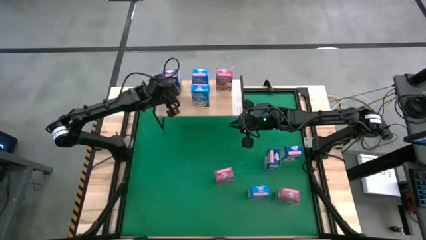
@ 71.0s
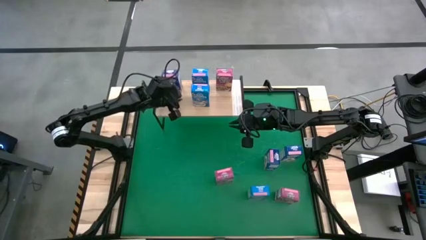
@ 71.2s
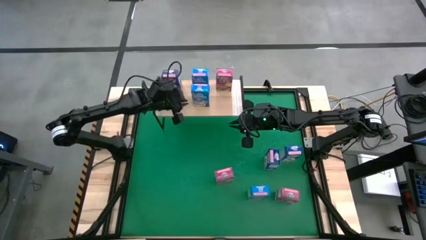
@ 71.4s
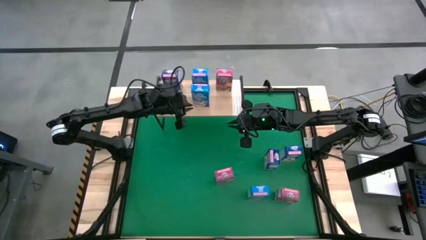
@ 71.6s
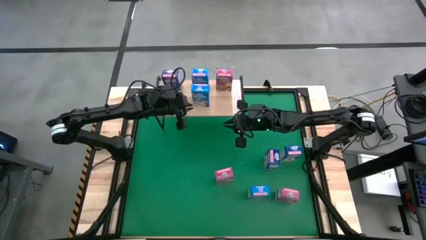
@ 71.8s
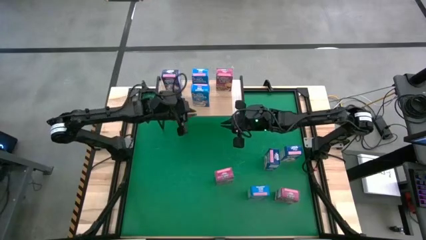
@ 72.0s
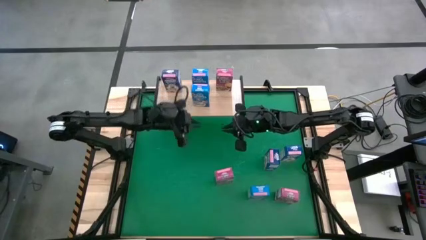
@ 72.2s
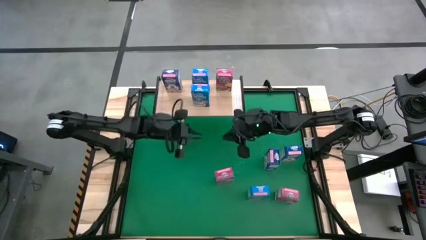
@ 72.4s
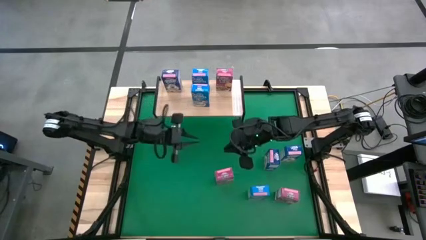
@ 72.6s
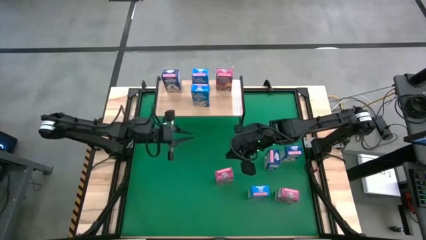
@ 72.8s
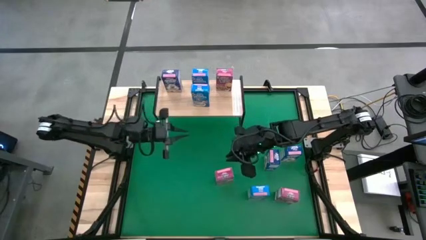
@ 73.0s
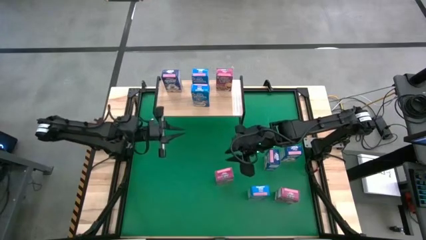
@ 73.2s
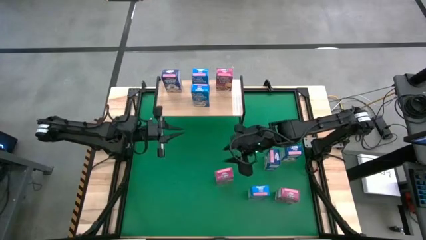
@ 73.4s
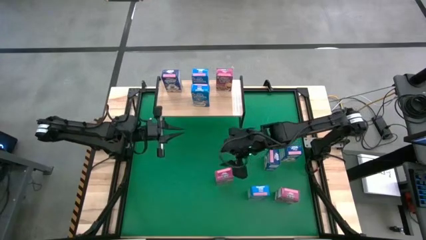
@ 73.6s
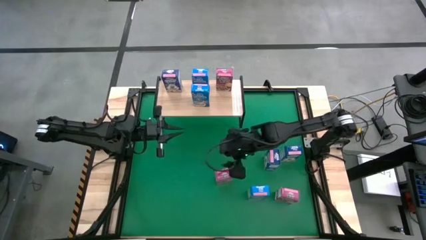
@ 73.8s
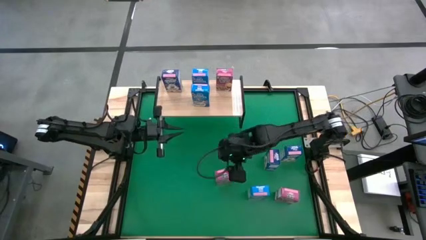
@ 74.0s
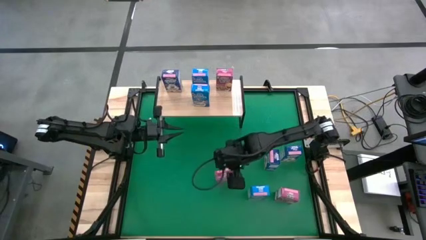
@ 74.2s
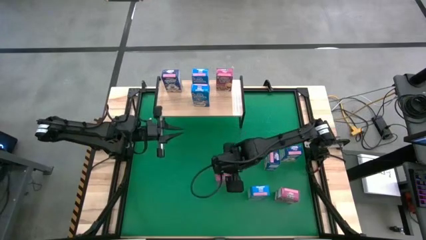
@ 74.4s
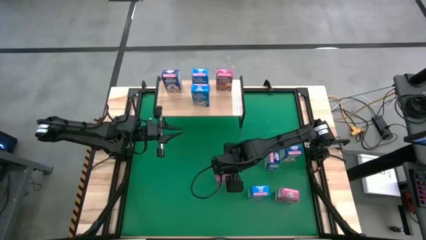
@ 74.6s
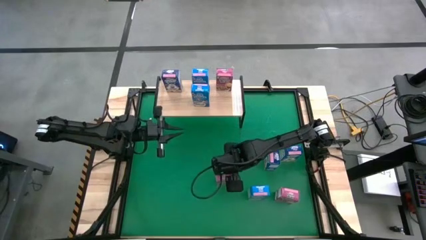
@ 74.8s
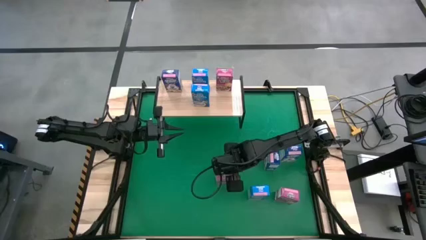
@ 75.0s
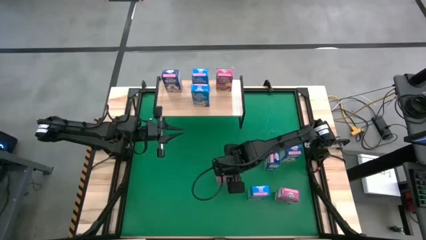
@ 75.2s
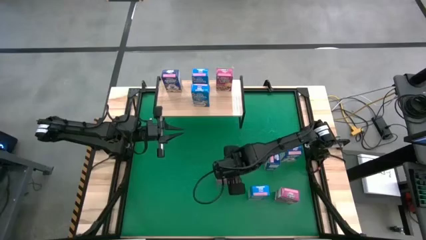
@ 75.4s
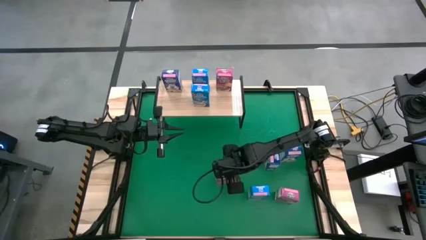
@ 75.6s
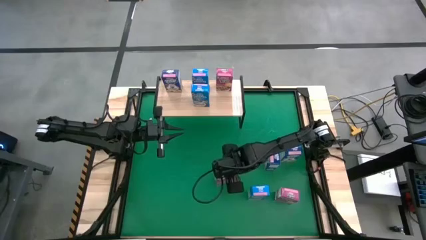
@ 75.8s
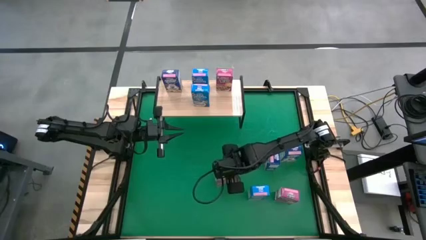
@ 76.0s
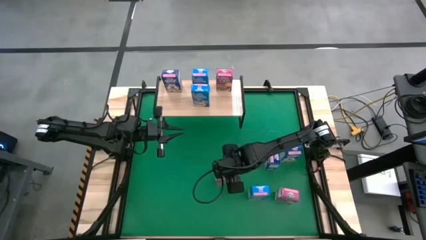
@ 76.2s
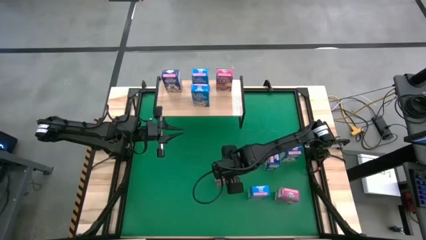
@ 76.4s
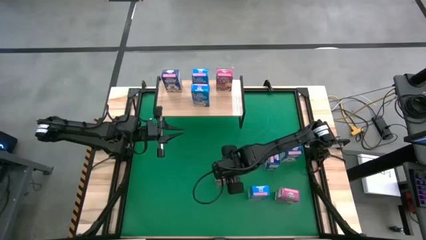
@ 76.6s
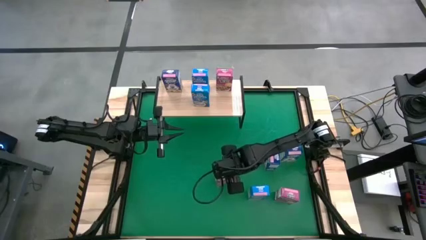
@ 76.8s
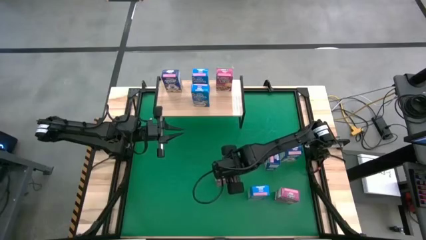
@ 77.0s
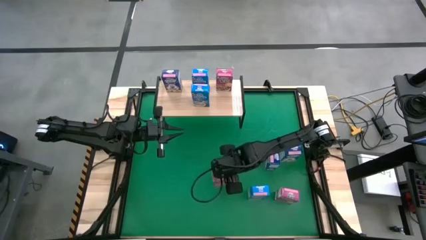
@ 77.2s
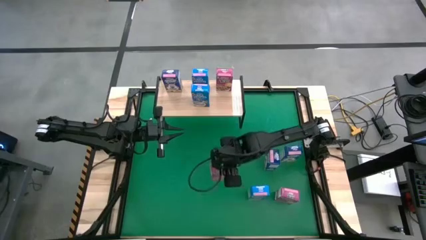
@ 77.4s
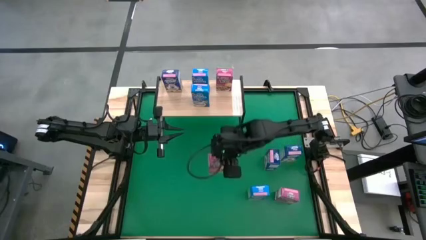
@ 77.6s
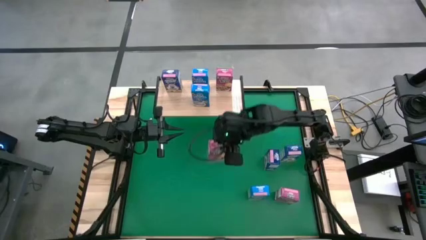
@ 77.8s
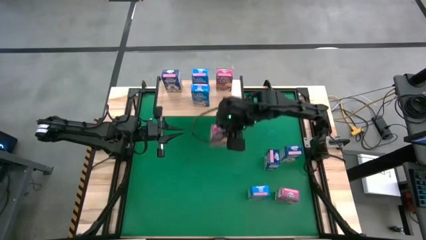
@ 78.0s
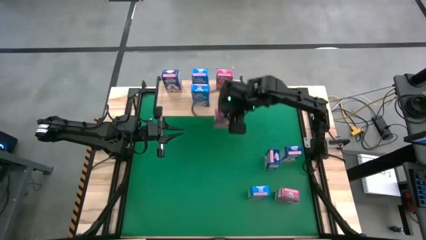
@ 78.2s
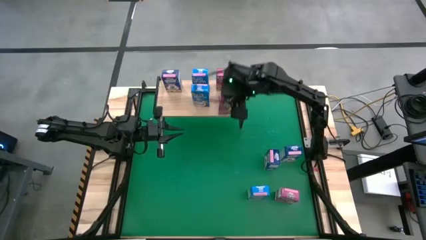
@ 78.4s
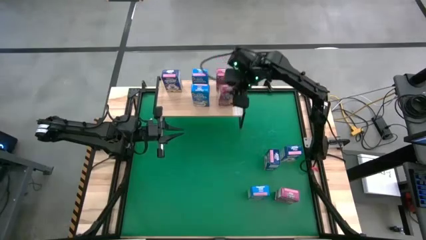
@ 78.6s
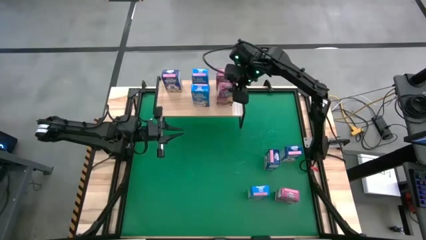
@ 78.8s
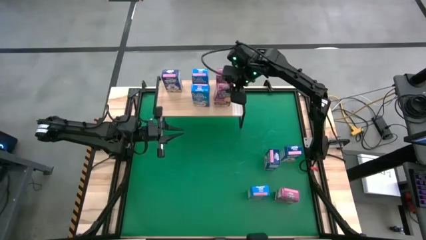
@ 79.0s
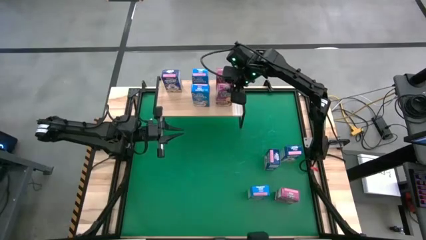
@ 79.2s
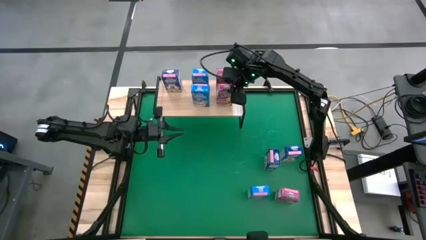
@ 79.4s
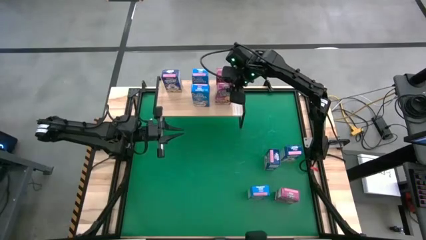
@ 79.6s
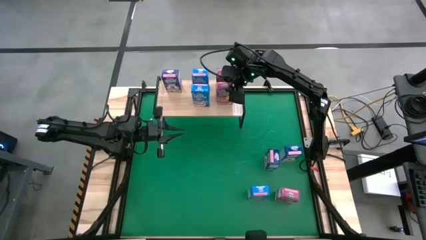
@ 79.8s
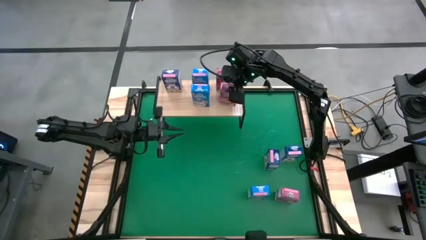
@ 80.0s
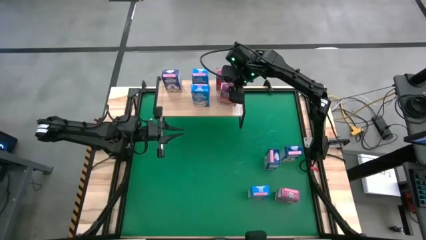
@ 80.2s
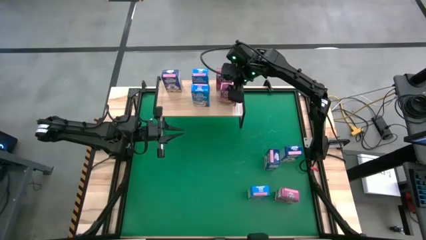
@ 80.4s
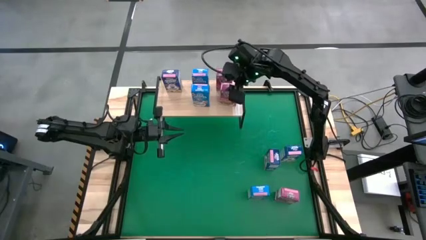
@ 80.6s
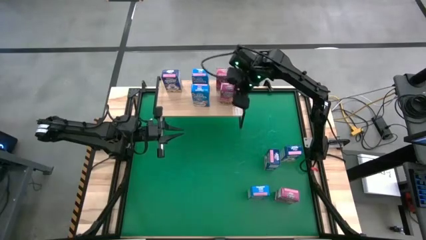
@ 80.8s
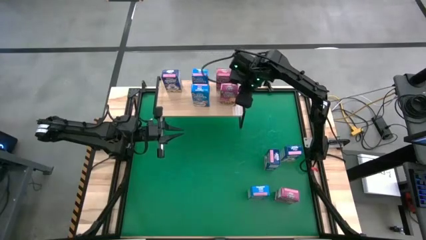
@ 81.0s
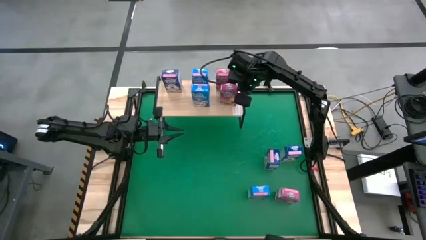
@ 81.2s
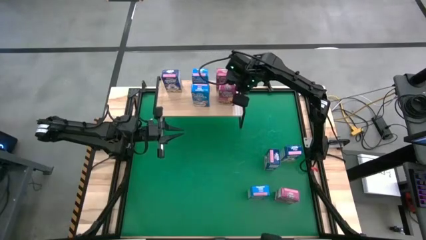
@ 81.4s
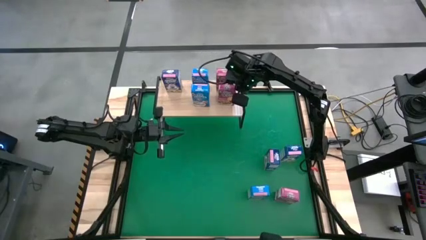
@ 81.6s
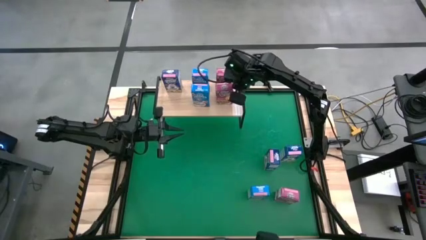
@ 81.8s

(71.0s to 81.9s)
Task: Stack cereal on shelf
Put the left pink cereal box on the shelf aligned with the other pink cereal box

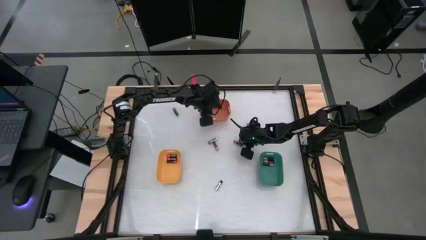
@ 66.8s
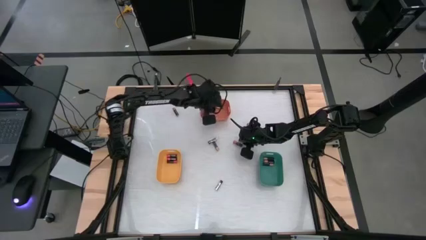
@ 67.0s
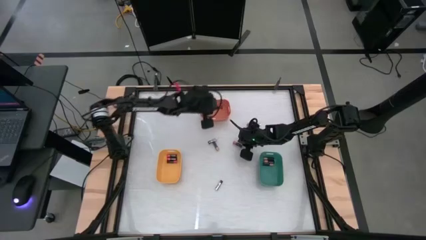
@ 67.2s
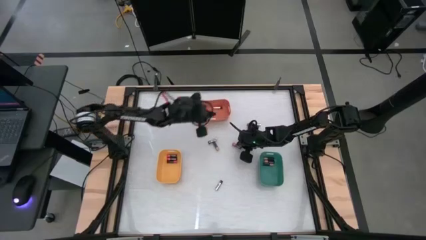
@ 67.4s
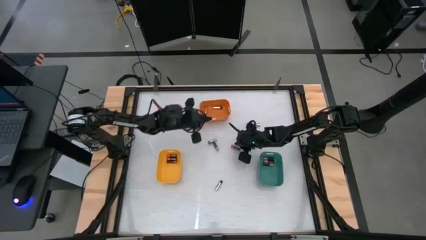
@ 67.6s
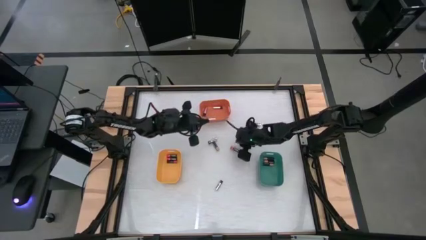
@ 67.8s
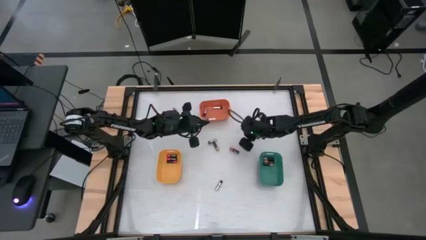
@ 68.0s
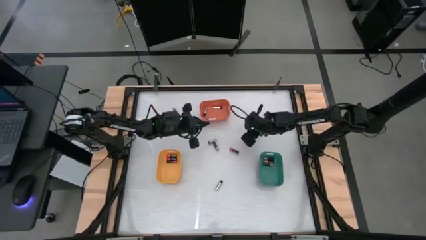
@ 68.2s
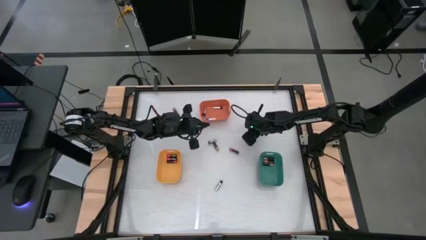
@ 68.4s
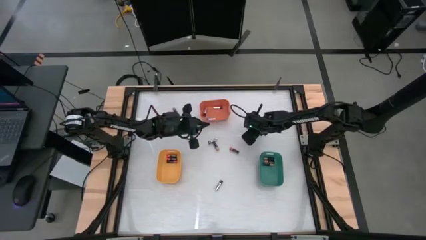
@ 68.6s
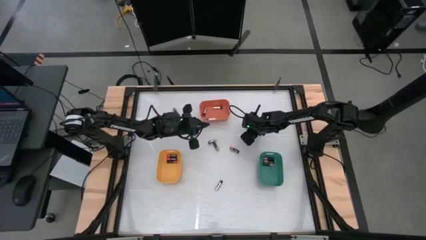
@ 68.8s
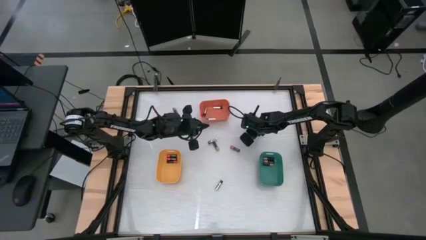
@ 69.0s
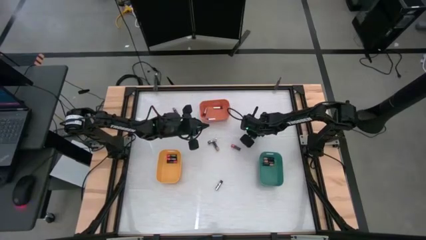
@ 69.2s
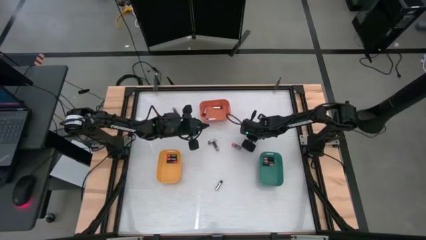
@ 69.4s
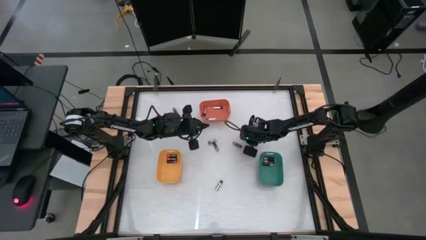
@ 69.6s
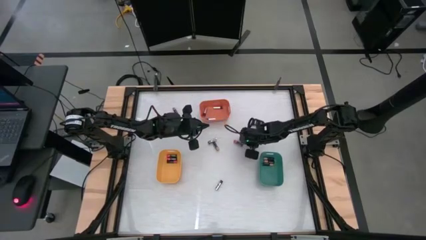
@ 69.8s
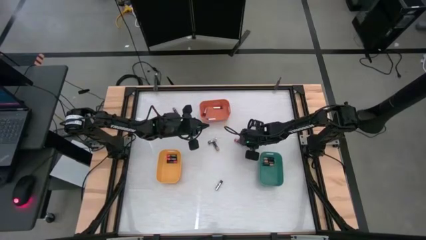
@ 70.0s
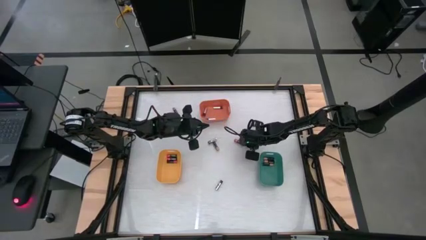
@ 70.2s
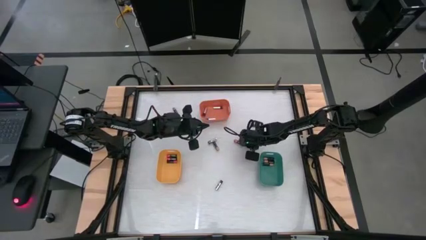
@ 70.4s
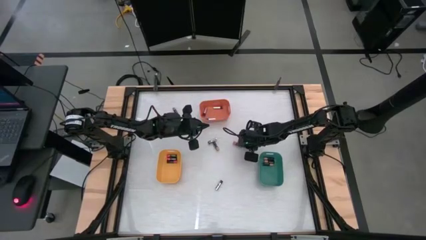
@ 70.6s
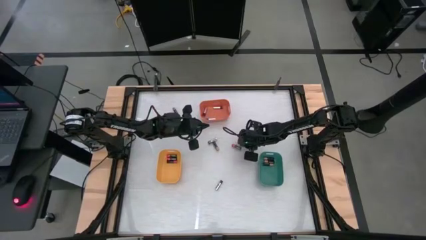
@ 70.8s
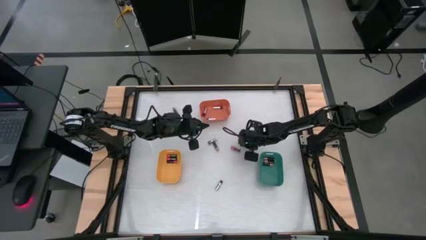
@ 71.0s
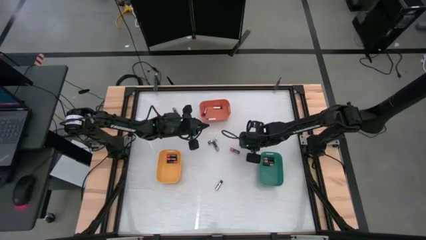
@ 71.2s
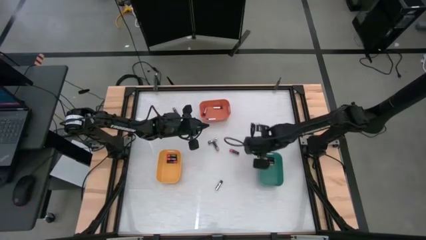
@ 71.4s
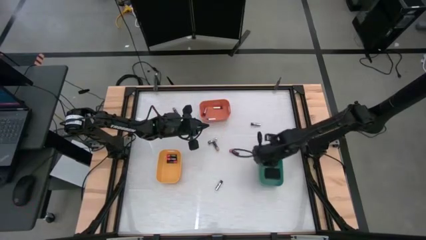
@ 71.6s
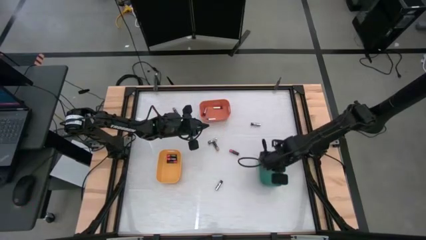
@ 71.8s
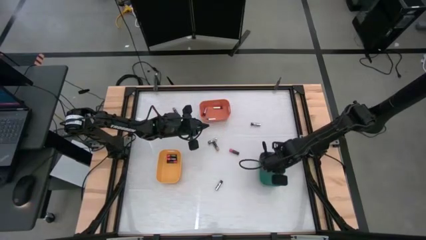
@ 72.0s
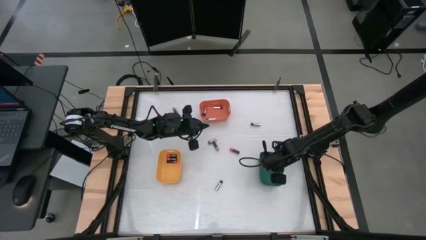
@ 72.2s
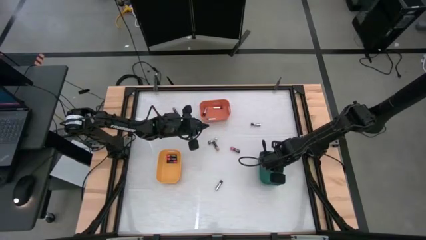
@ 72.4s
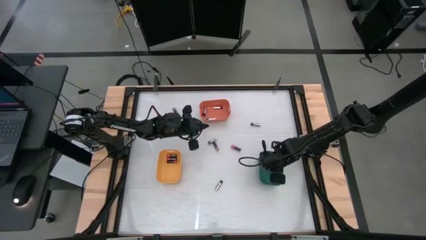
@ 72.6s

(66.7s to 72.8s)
Task: Sort batteries
Put the brown battery into the green bin

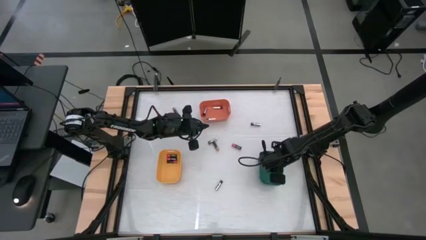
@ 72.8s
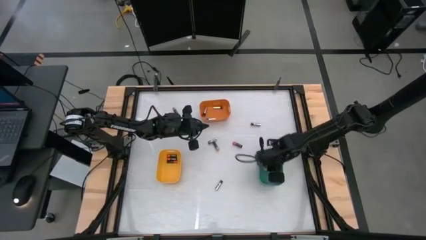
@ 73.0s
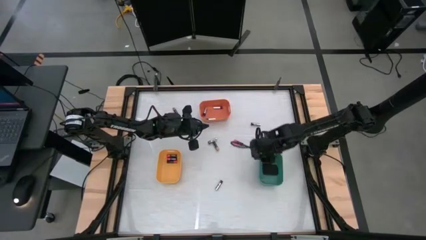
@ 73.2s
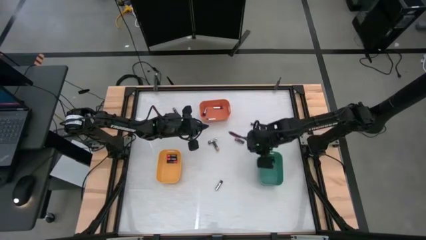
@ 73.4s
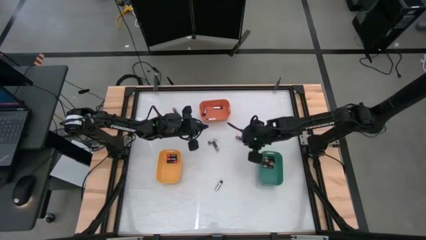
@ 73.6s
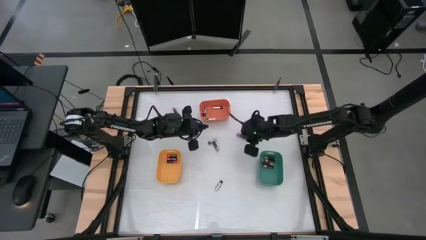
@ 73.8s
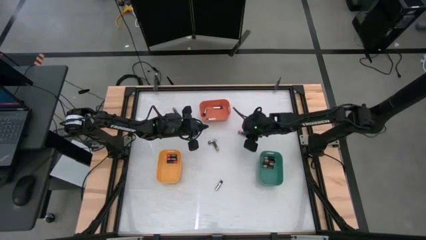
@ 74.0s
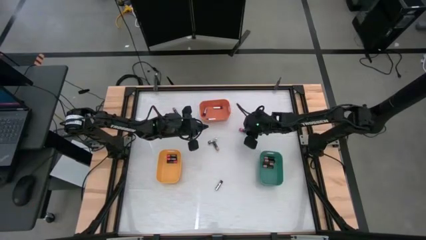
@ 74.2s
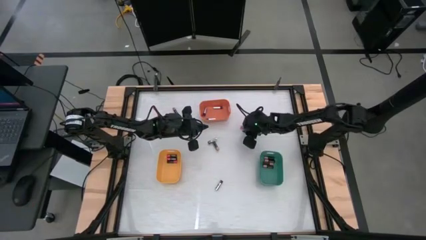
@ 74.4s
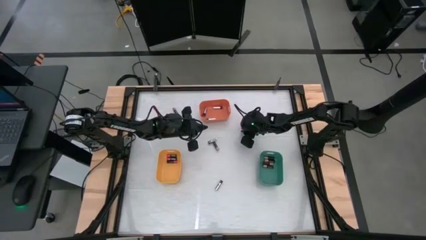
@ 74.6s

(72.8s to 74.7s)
Put the red battery into the yellow bin
